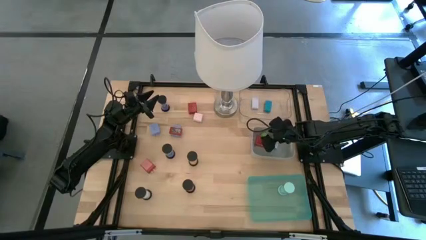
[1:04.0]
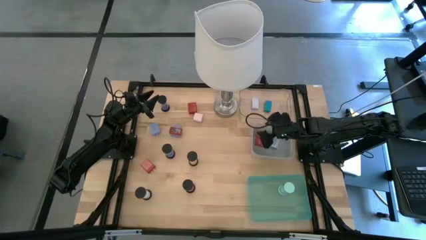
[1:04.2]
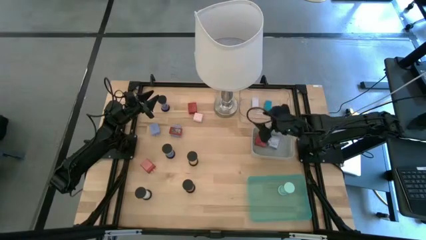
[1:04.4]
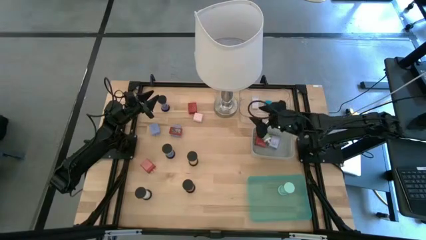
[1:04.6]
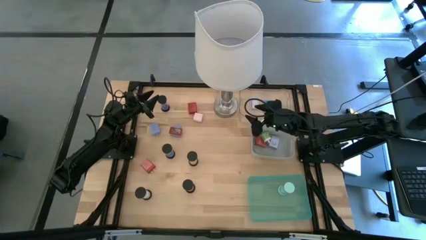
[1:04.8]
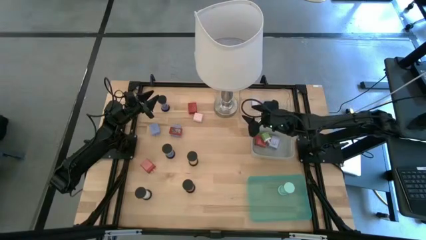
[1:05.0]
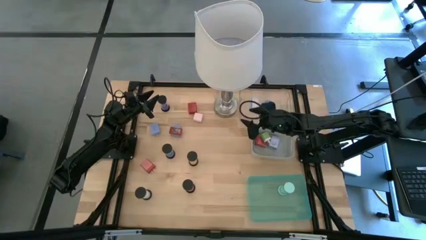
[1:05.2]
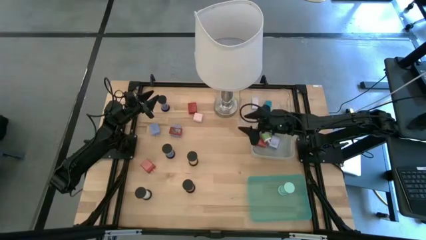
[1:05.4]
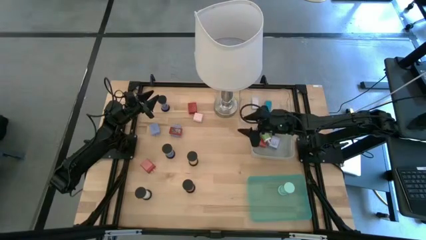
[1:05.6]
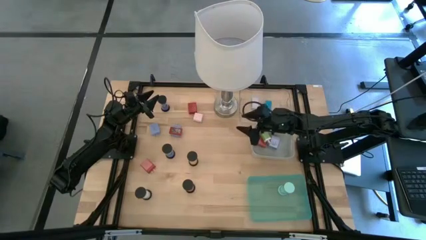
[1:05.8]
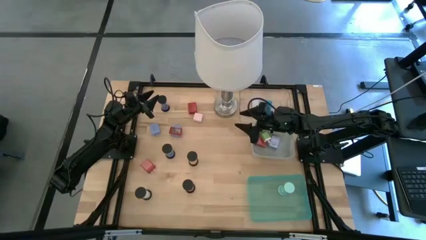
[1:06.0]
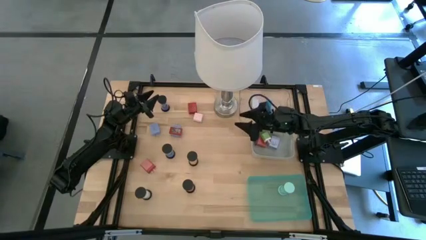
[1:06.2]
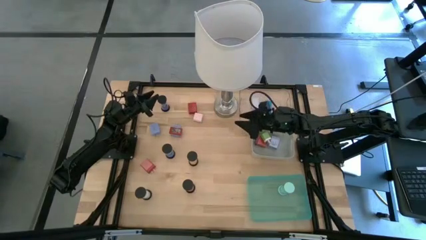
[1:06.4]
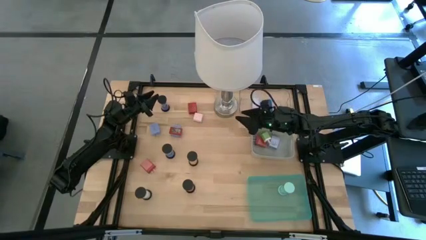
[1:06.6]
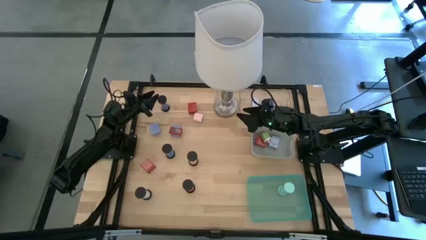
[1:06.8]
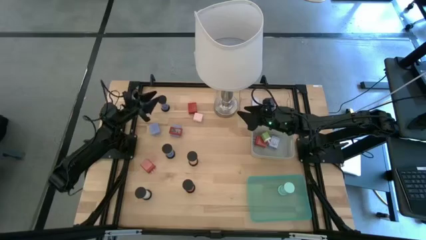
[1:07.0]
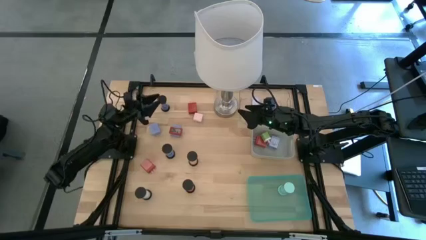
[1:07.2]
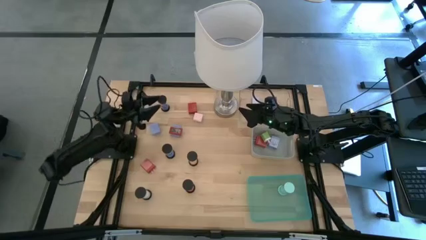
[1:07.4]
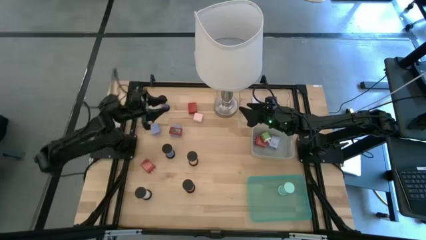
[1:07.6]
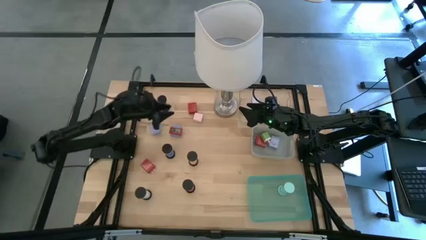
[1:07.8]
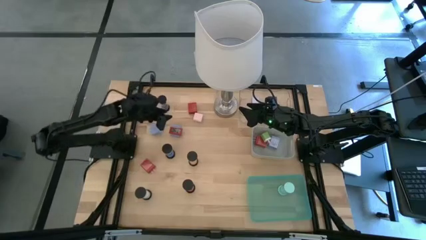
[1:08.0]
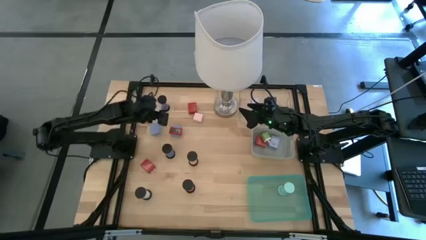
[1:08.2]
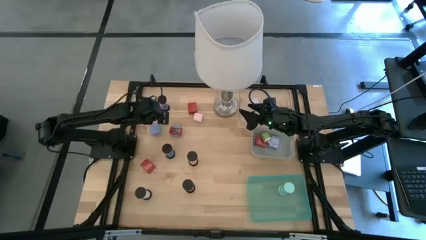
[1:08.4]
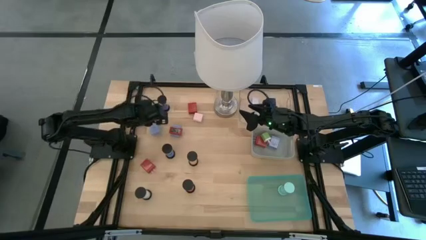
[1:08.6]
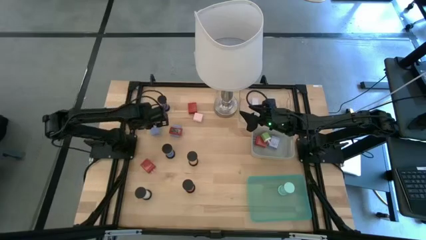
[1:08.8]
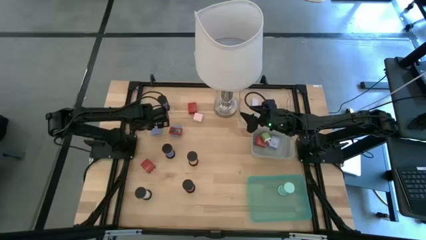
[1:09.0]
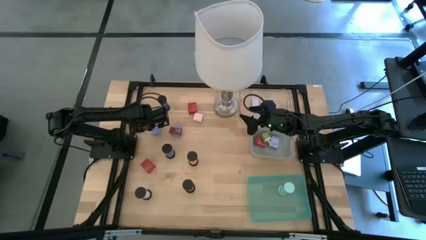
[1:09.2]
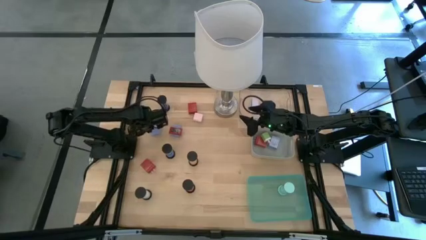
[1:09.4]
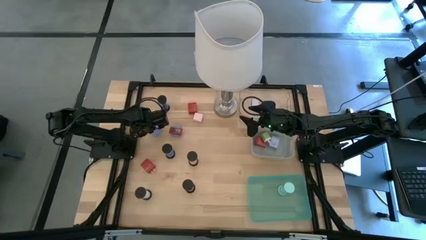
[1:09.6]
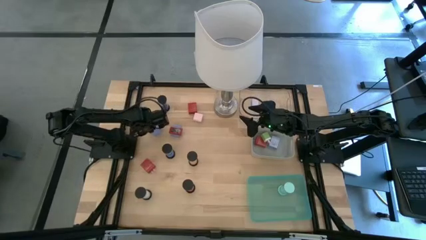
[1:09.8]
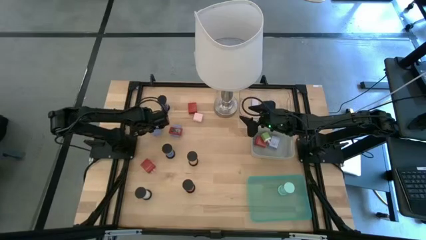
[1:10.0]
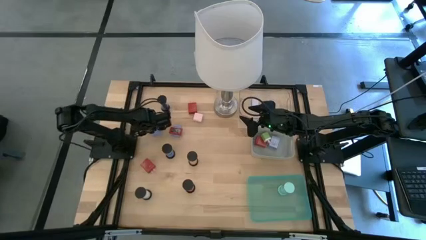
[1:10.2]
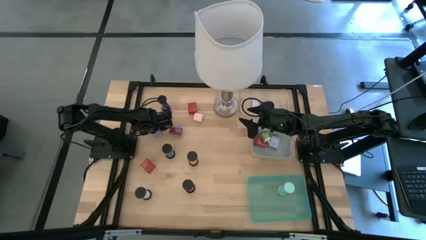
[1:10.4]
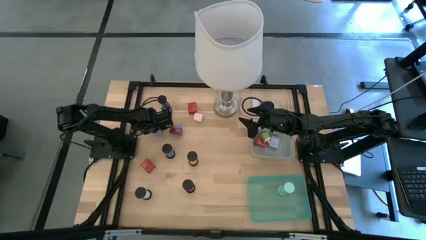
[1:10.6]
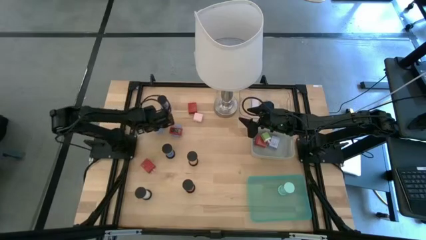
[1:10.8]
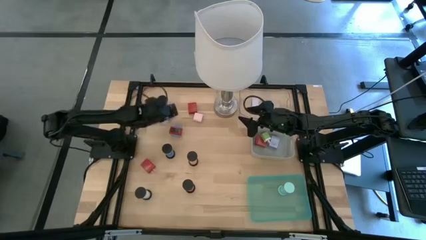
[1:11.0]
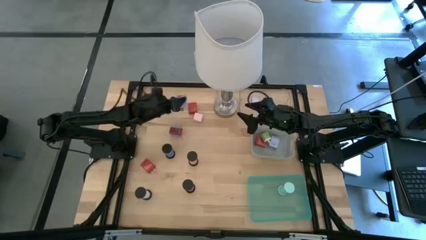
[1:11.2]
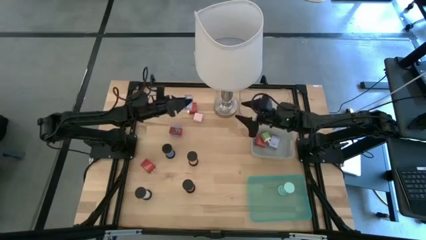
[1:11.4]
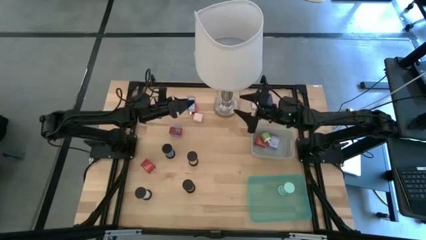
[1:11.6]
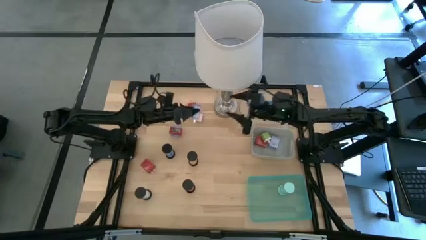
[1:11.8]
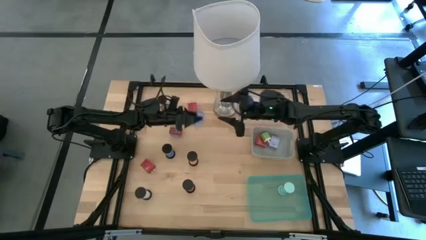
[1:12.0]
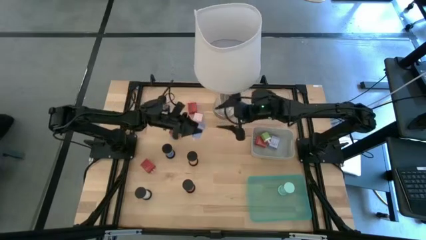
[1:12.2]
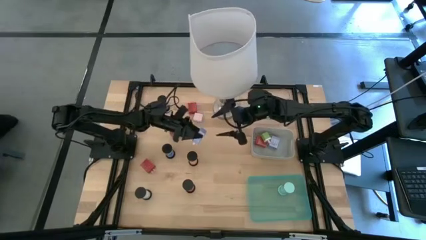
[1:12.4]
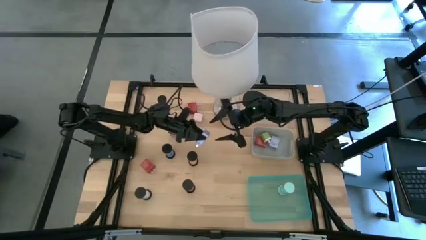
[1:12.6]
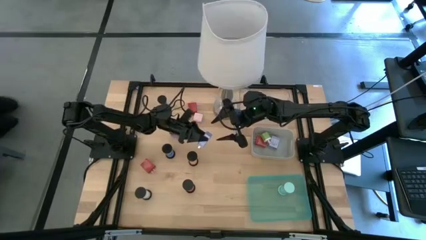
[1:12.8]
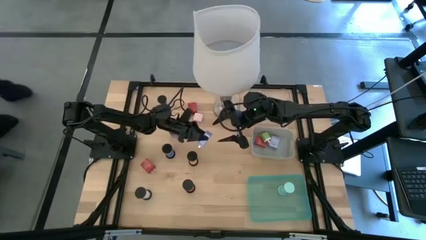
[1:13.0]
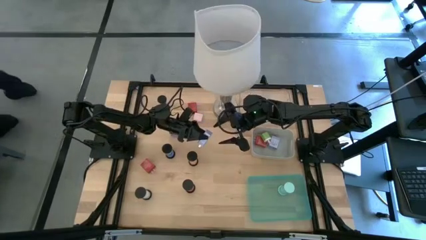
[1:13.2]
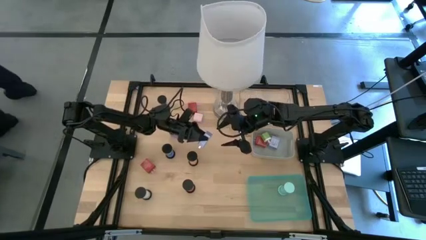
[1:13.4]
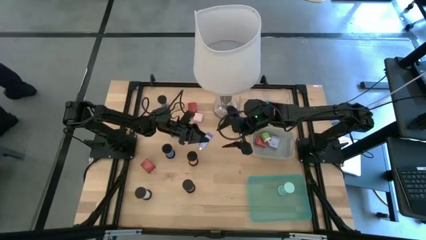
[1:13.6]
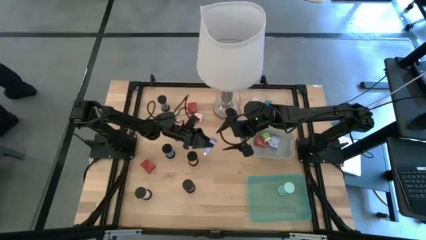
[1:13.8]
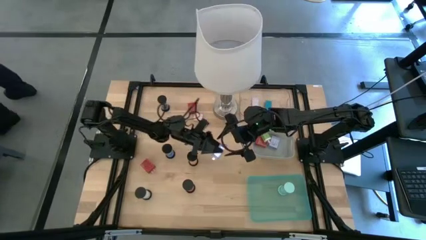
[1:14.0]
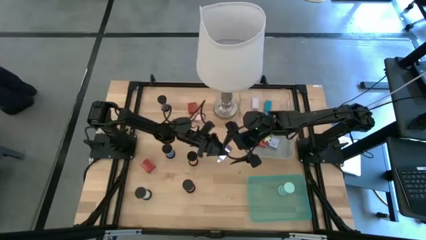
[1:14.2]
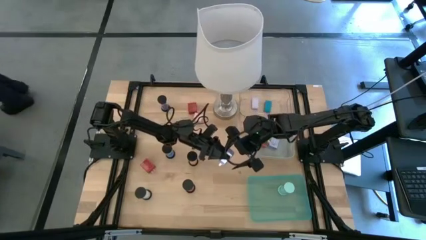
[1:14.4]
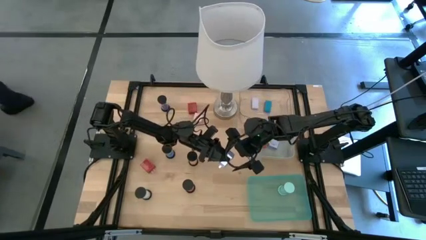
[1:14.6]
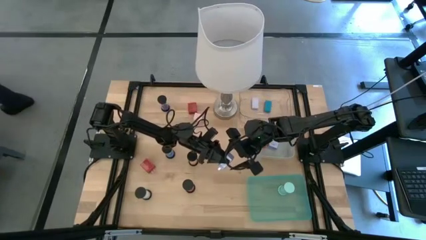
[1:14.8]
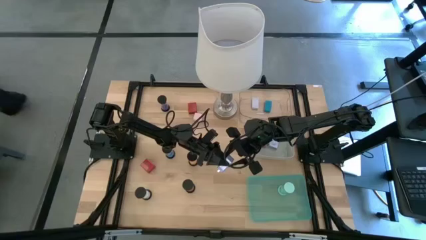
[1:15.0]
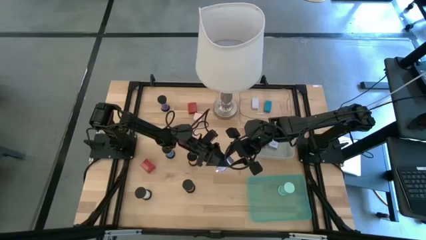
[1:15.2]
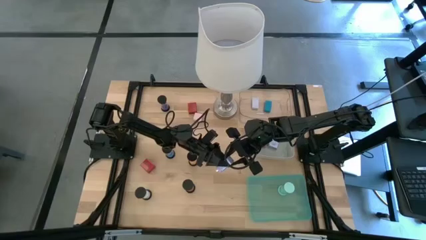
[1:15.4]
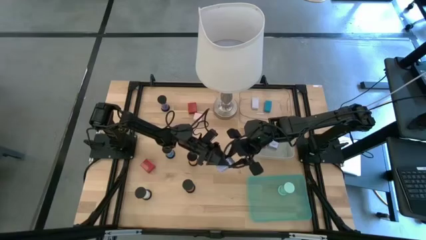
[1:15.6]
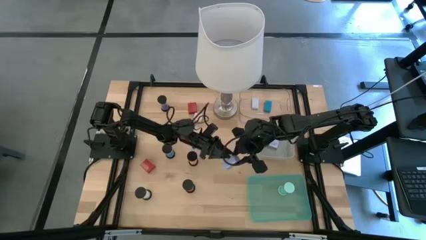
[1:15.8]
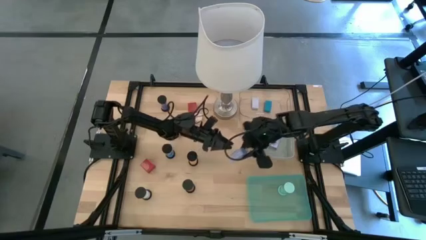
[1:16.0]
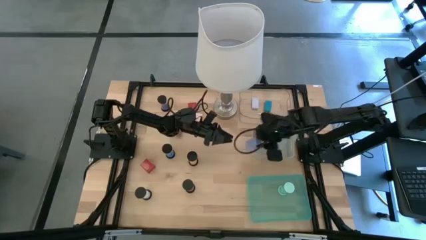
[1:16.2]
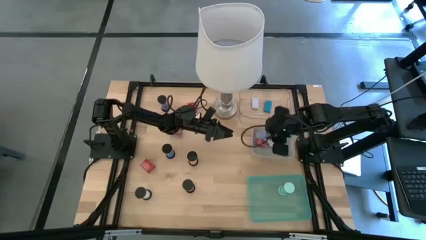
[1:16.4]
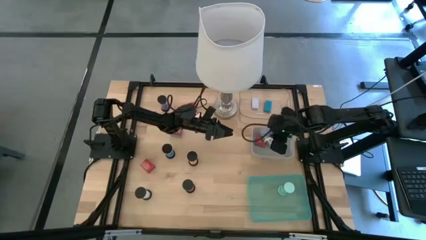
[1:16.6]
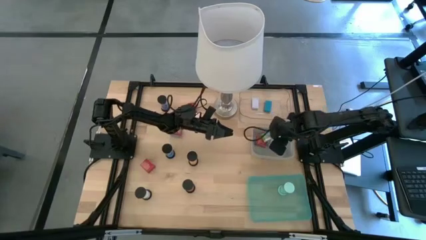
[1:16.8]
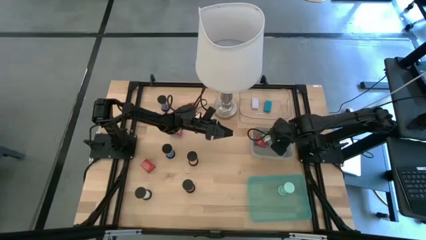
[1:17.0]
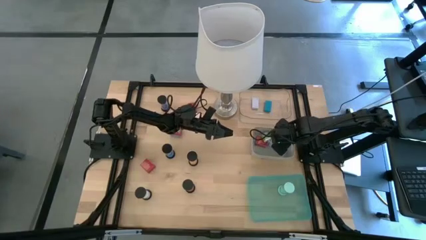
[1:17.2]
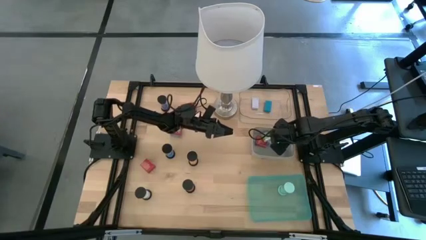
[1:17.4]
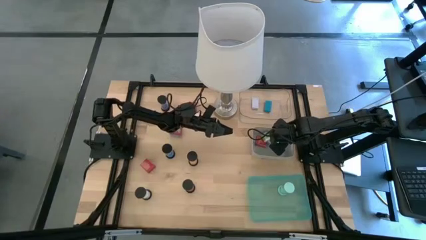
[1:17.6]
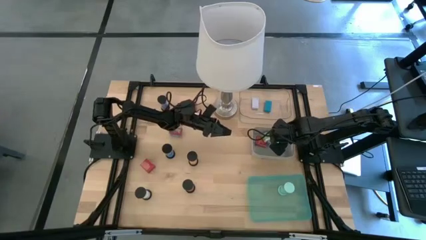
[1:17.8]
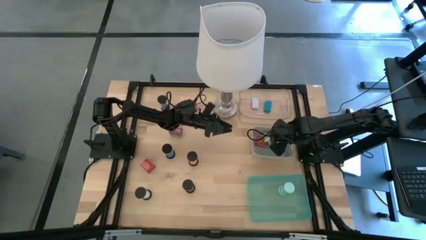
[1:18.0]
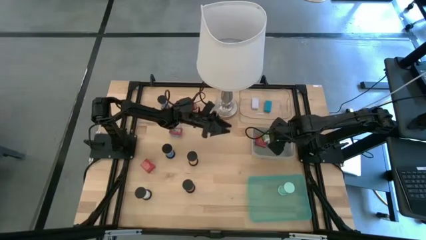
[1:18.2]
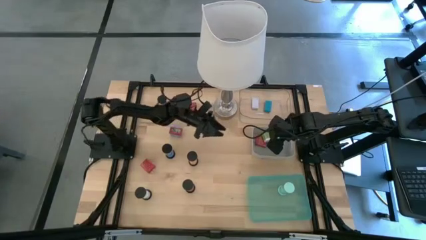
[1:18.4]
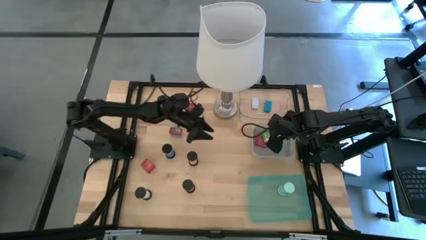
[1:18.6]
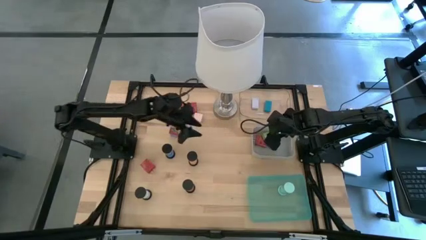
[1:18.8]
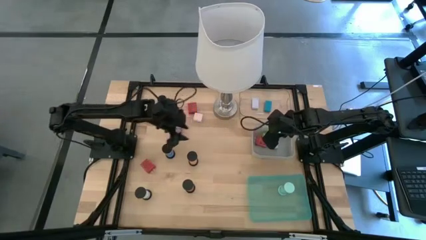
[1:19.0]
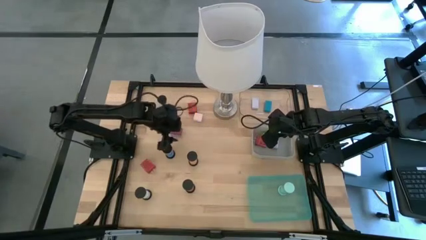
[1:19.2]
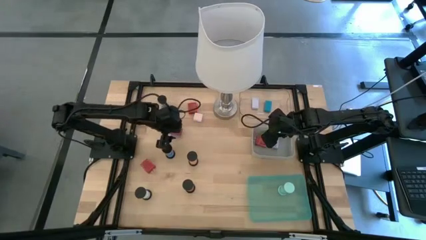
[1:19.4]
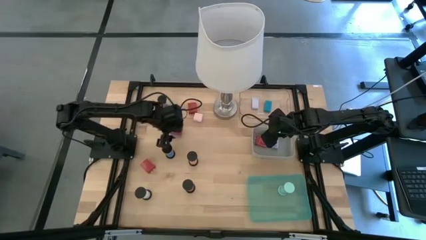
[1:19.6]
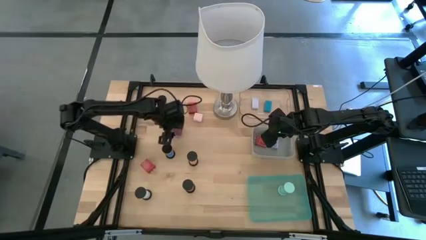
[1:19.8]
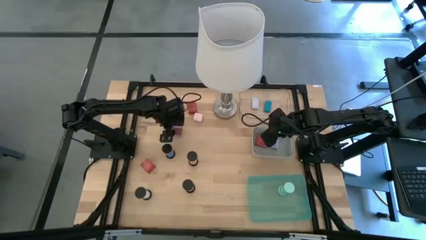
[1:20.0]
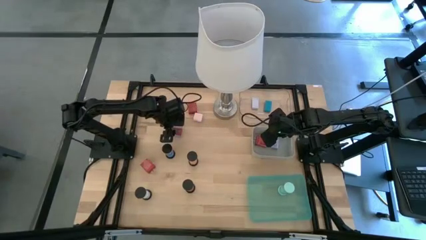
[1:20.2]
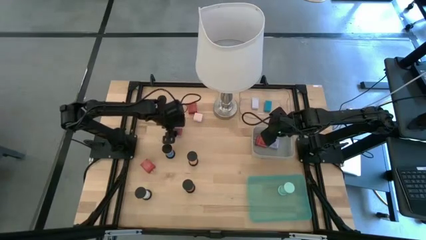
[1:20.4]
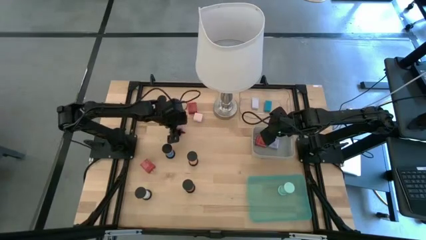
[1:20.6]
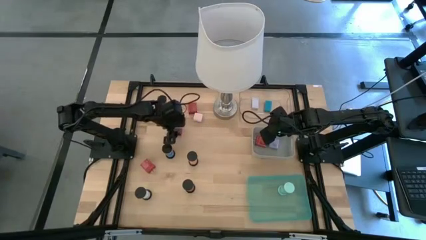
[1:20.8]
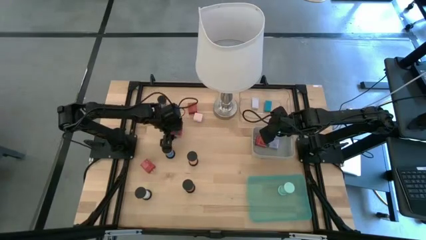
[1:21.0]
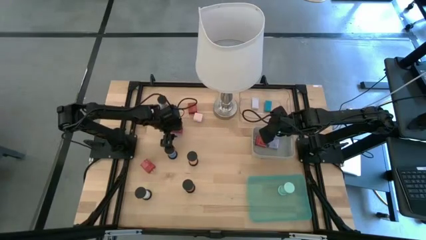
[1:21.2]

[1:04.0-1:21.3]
Task: Pick & Place Office items
Put the purple charger adapter into the gray bin
